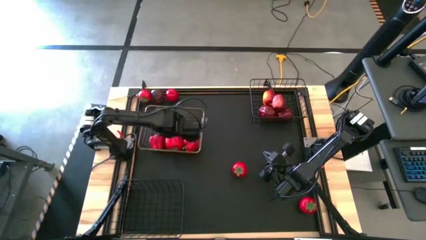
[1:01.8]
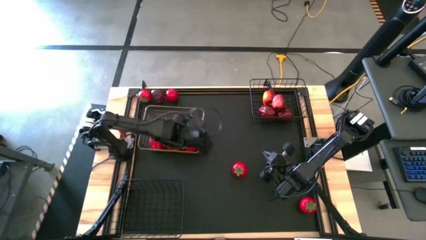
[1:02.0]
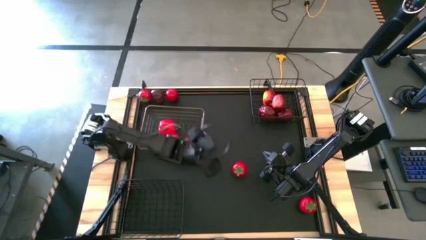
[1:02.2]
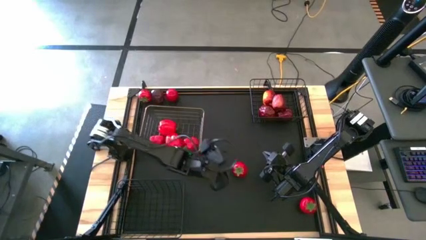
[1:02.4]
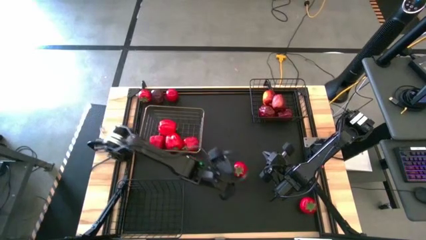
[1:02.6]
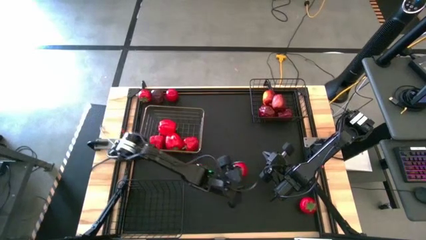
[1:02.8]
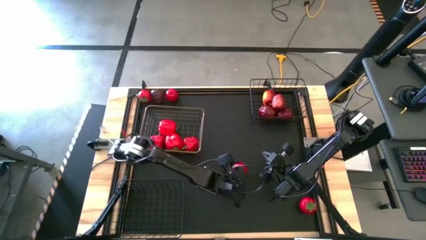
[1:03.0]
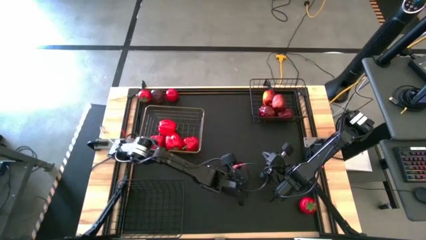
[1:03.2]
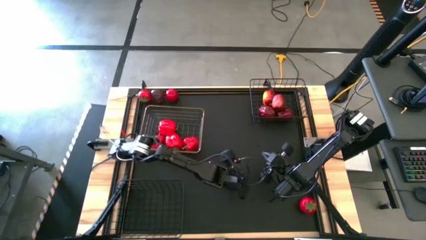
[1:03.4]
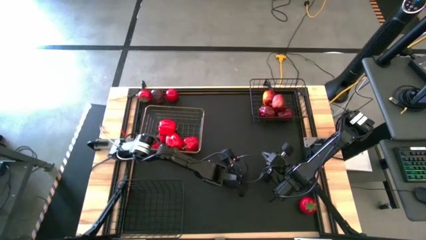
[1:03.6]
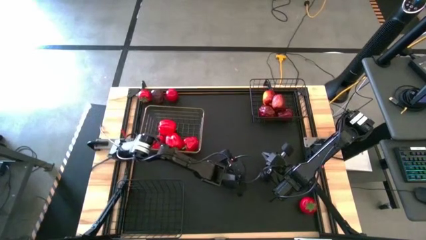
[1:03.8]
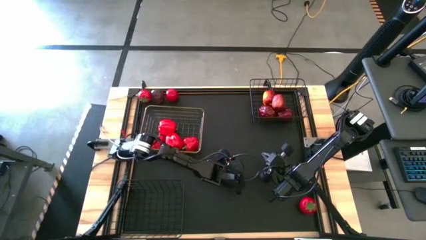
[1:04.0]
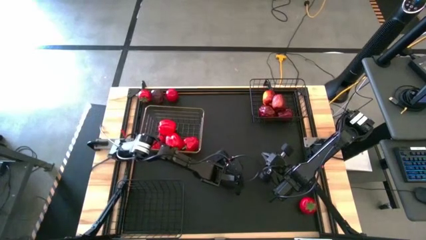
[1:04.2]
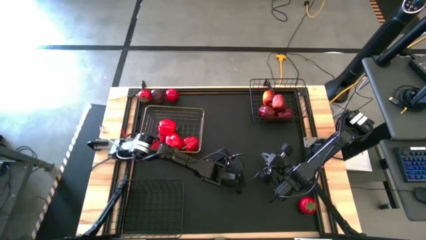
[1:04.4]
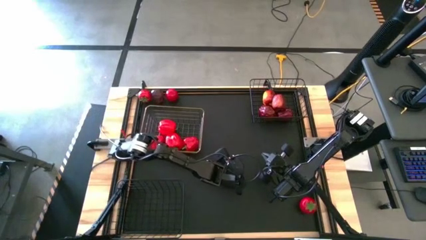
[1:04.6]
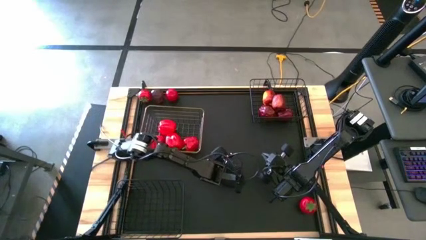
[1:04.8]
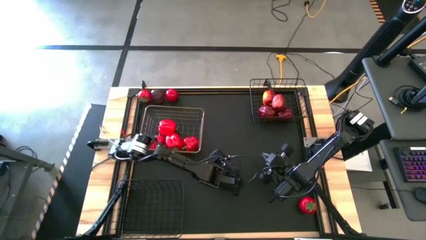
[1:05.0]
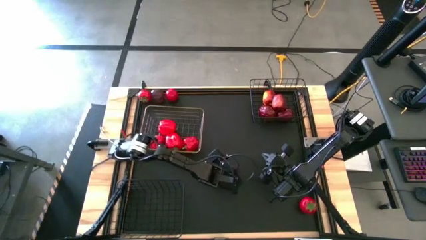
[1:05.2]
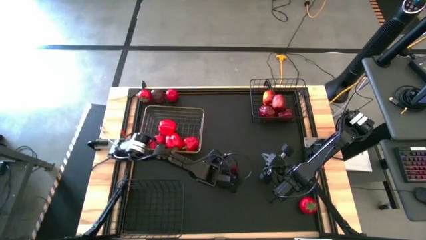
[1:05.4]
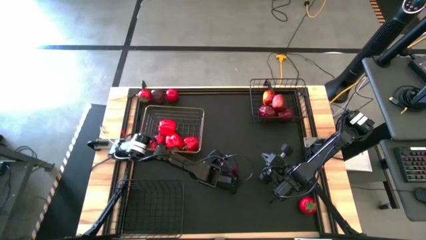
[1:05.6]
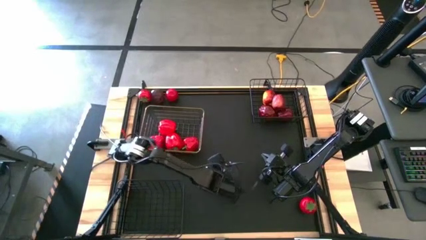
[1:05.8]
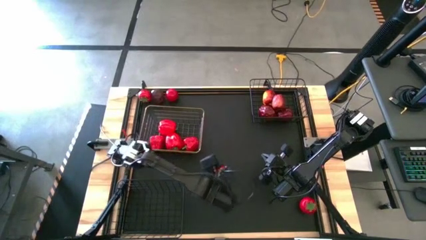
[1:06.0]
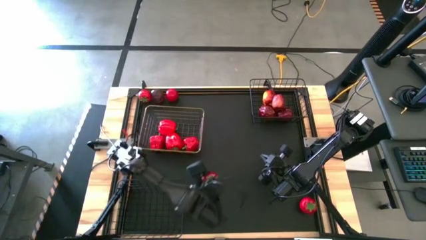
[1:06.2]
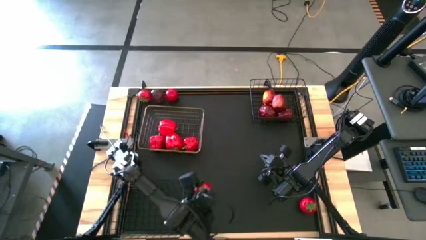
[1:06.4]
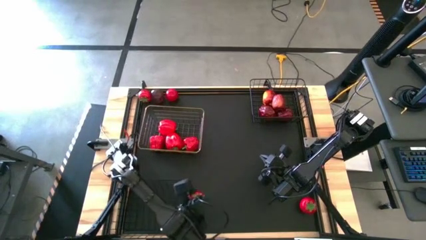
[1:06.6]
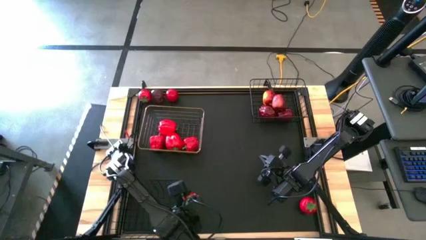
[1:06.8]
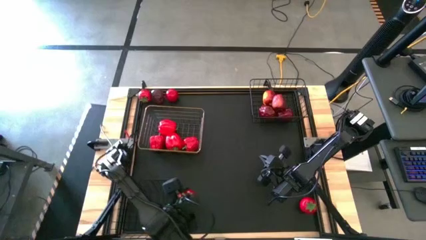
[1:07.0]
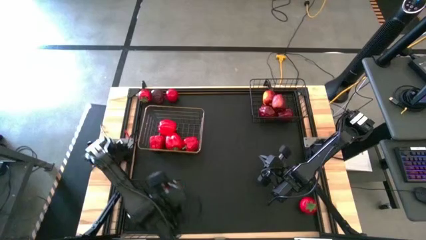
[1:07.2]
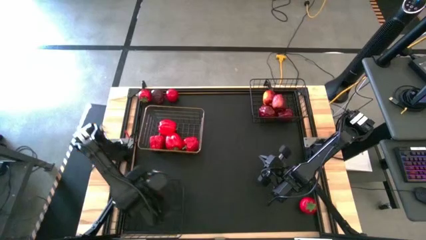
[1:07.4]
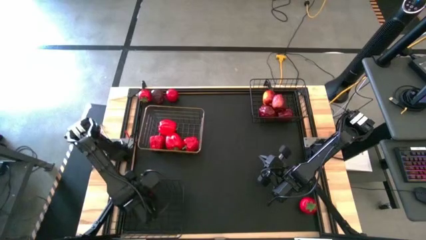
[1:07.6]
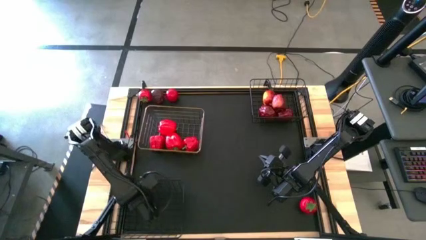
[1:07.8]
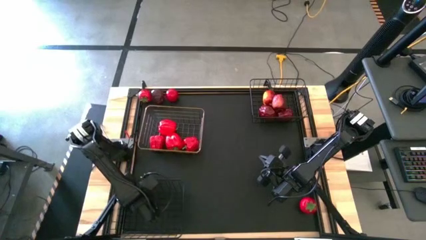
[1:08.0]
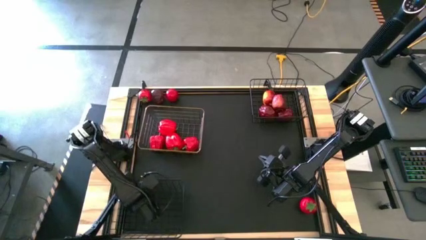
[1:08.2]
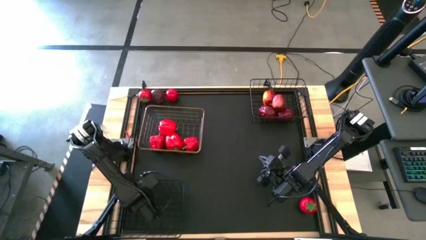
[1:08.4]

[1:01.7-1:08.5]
Task: Sort produce into baskets
Put the center tomato into the left black basket

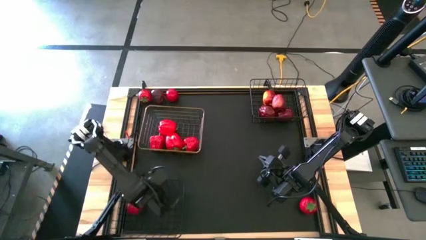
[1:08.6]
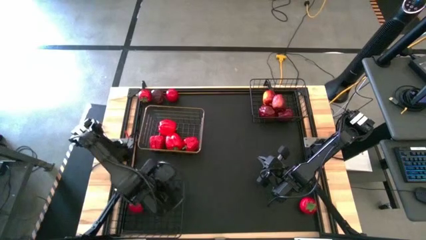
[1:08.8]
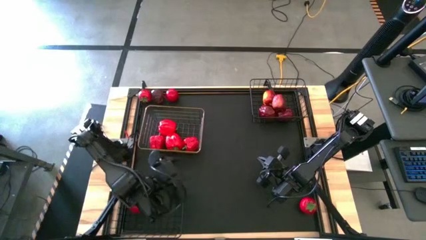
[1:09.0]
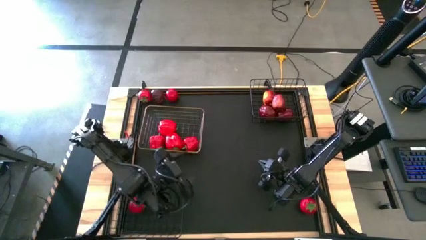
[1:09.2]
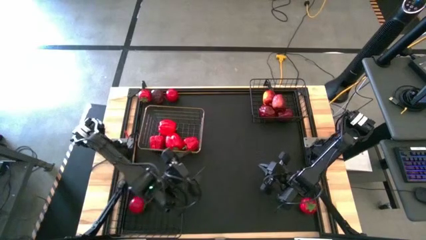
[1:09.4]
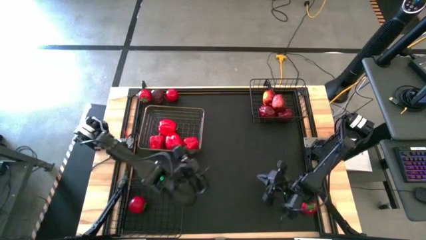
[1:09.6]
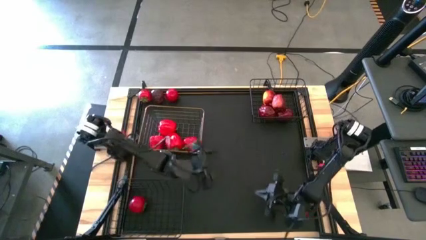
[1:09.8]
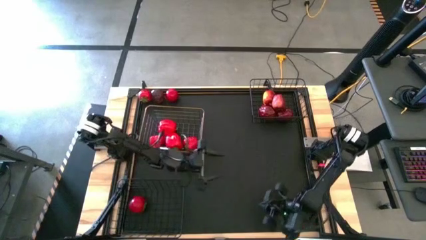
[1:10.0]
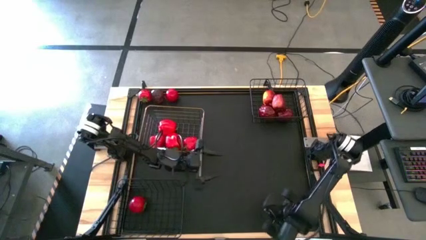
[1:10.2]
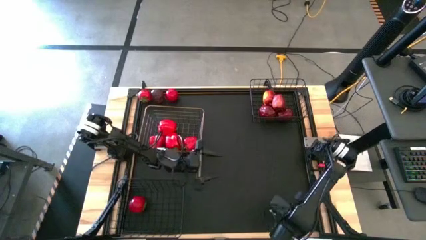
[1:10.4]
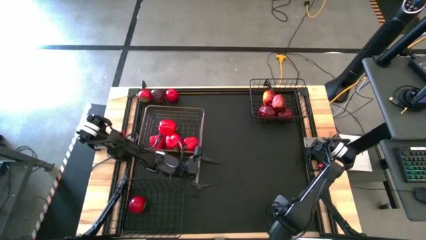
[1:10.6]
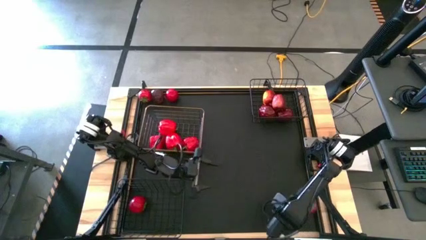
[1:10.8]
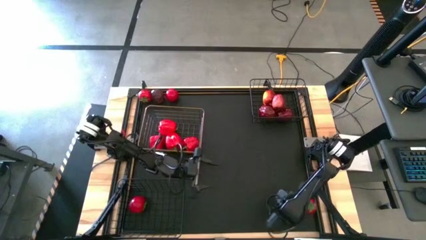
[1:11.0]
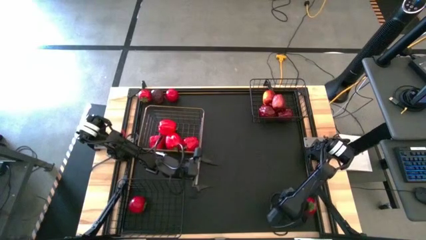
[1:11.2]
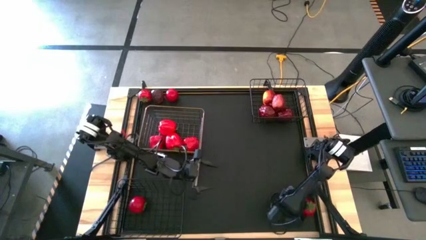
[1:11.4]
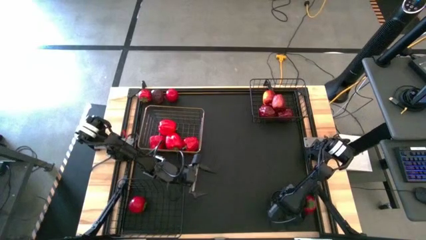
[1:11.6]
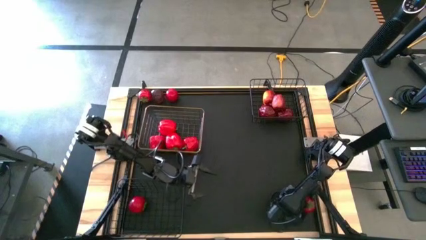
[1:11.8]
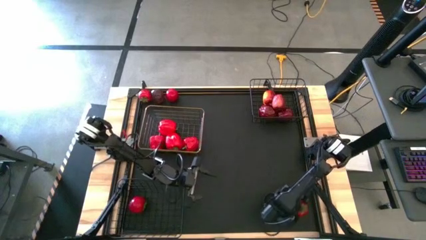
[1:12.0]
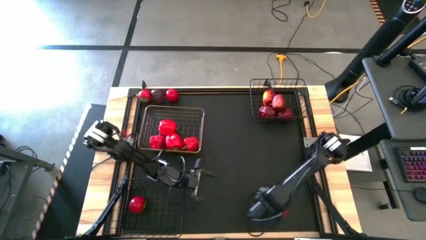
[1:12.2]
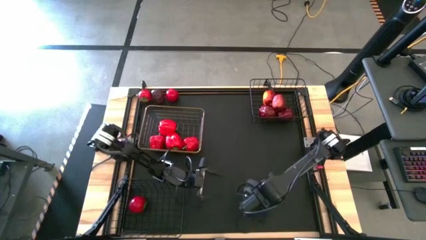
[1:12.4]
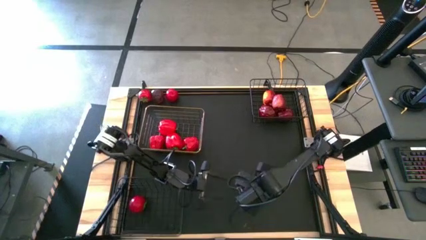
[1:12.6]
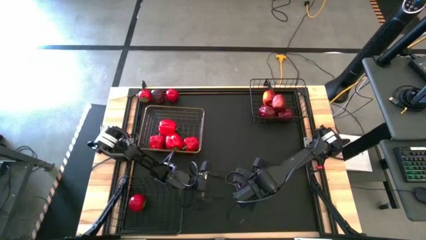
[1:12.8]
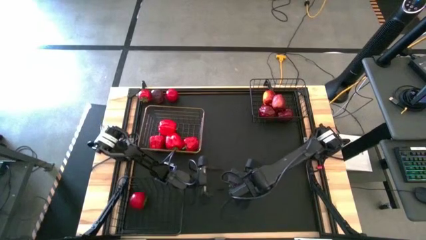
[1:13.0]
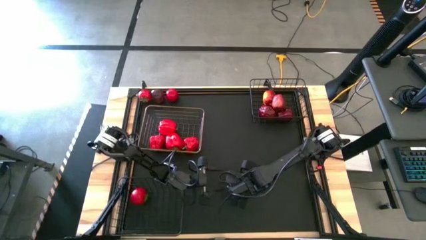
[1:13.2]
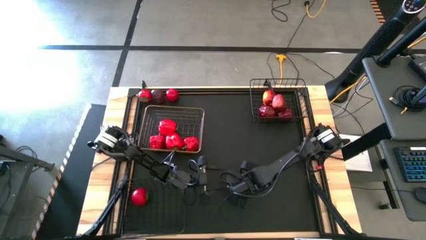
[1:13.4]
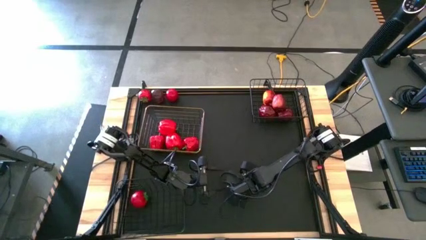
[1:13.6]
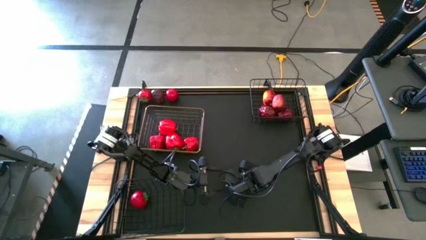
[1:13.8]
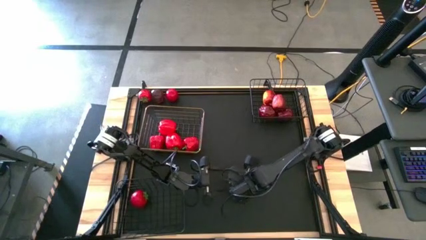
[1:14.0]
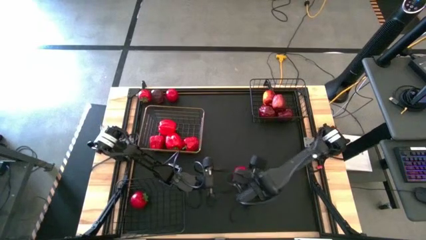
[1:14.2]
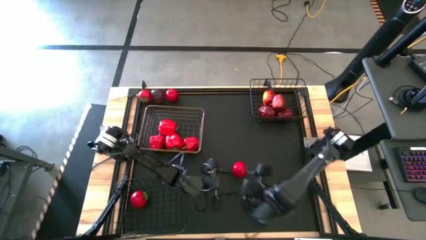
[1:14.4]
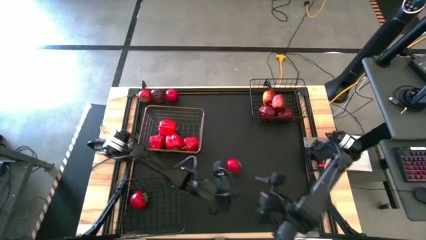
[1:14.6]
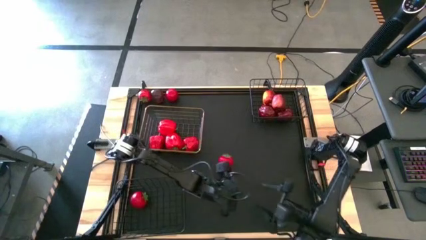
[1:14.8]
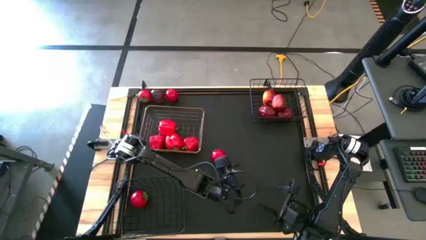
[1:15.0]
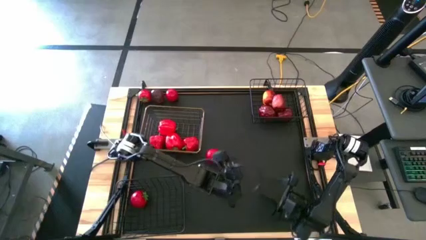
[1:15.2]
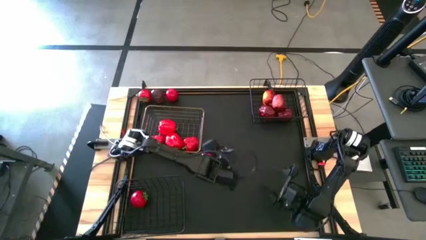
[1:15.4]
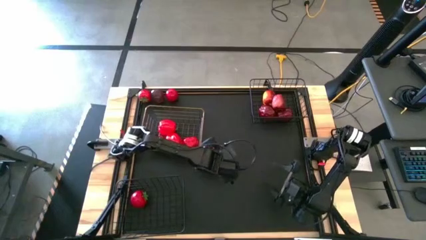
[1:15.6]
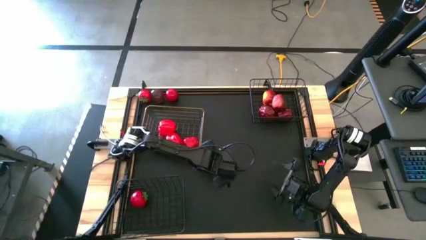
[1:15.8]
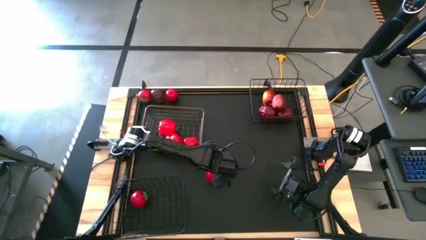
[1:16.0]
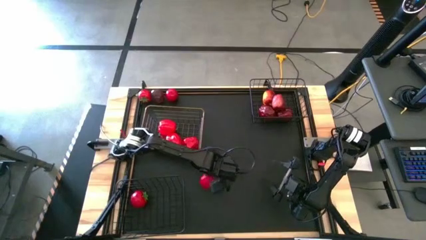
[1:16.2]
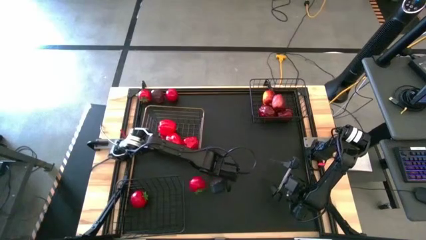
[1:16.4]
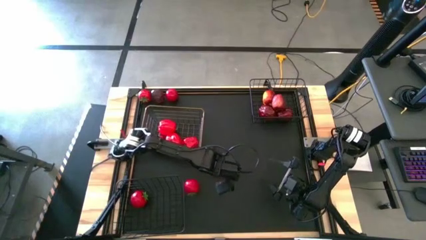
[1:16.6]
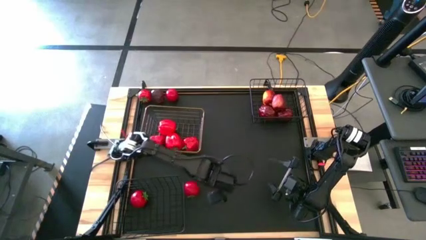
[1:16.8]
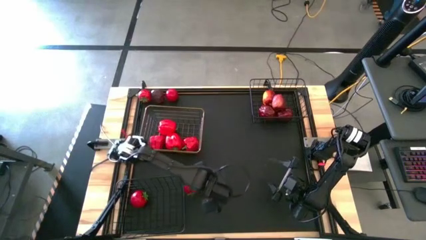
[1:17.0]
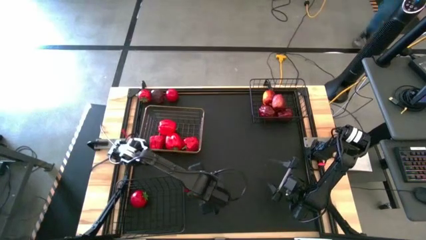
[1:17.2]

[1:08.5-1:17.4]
Put the bottom right tomato into the left black basket

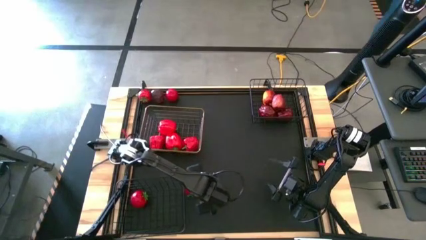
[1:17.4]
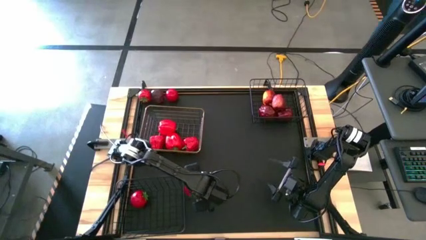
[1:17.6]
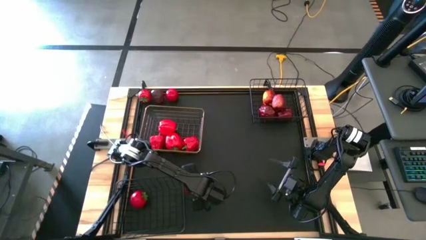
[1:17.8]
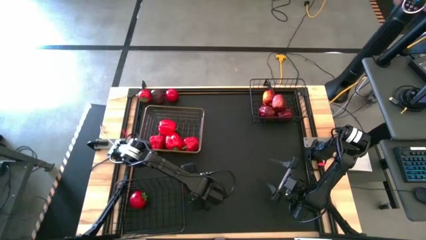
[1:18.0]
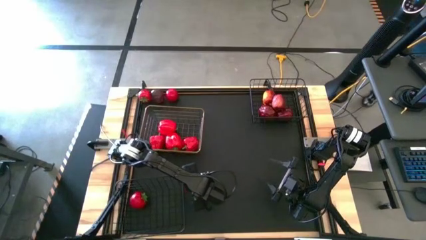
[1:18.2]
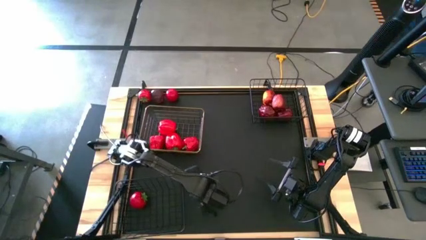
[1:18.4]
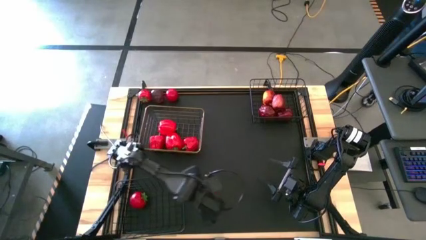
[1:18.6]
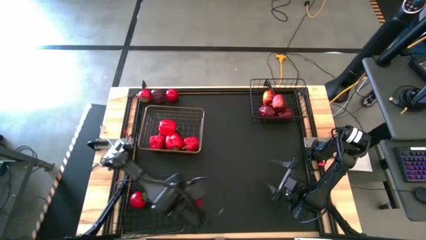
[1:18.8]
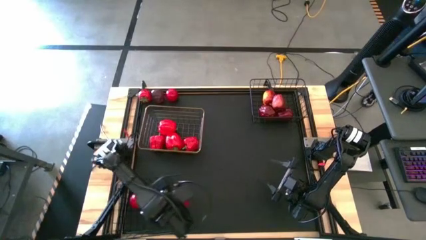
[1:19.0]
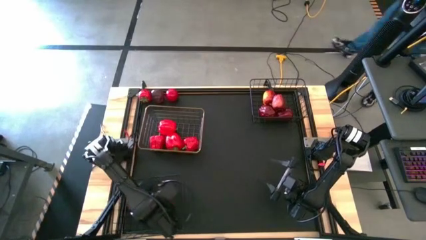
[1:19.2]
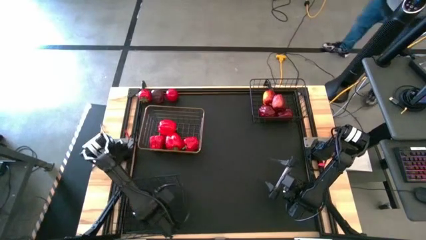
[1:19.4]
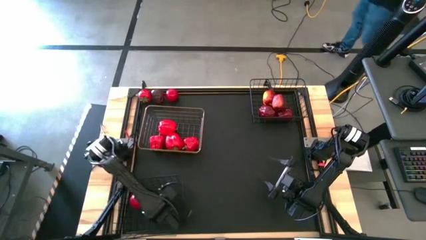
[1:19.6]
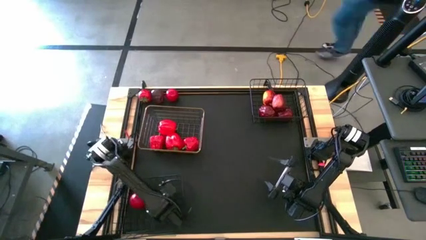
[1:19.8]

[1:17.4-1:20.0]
Put the bottom right tomato into the left black basket
